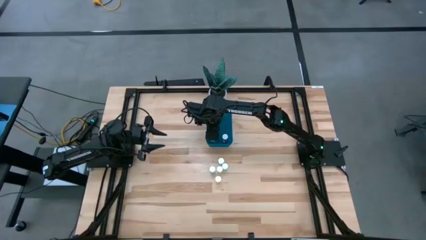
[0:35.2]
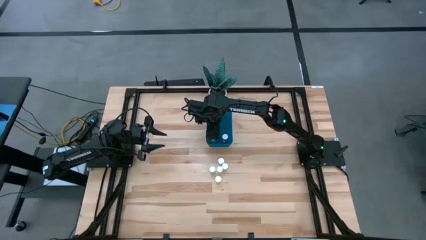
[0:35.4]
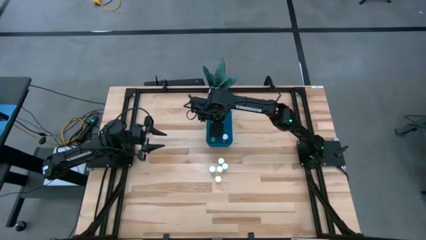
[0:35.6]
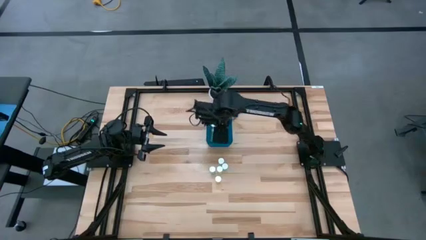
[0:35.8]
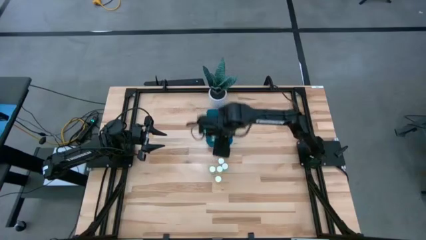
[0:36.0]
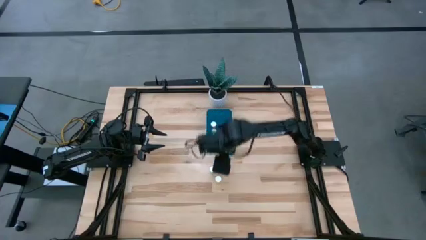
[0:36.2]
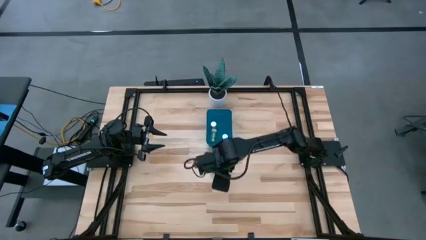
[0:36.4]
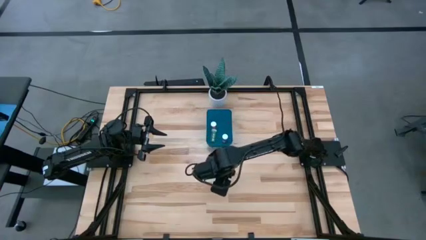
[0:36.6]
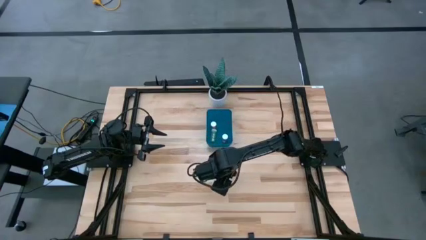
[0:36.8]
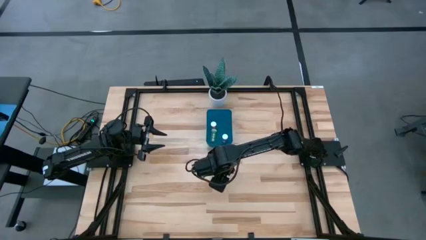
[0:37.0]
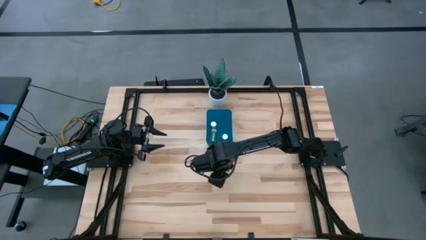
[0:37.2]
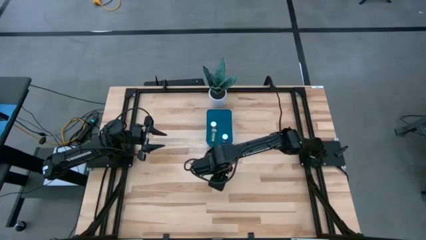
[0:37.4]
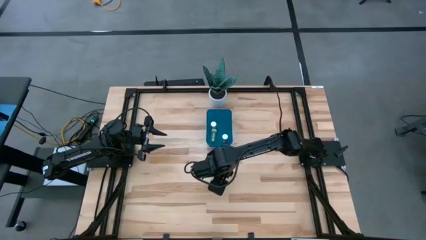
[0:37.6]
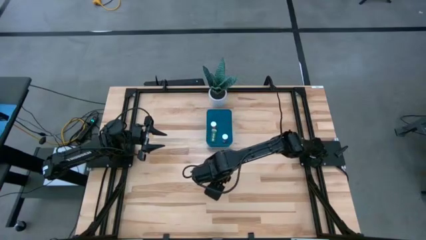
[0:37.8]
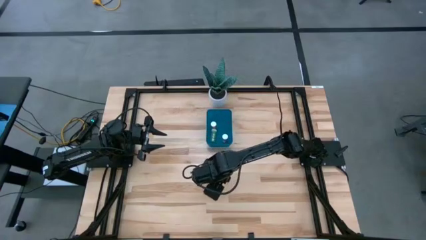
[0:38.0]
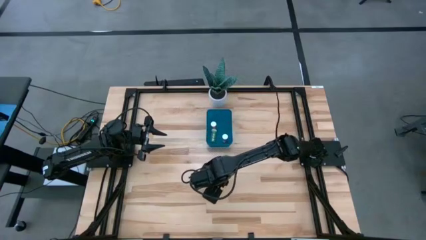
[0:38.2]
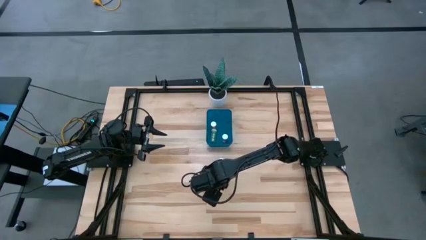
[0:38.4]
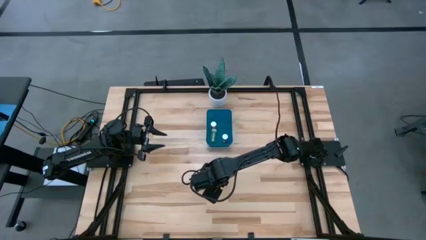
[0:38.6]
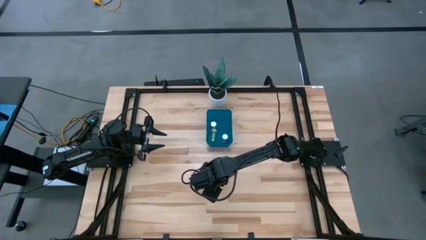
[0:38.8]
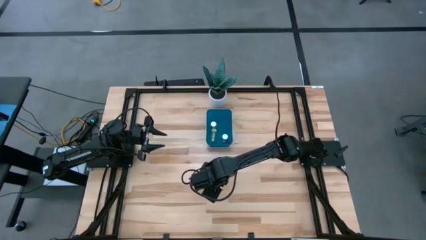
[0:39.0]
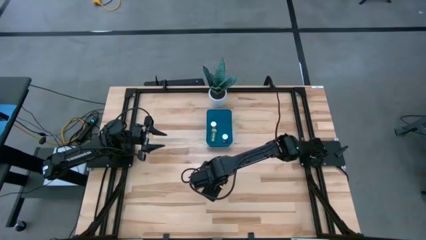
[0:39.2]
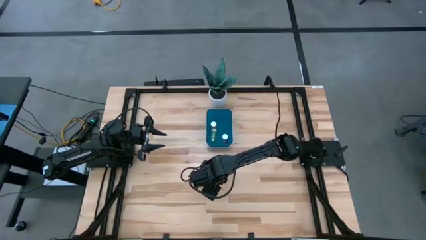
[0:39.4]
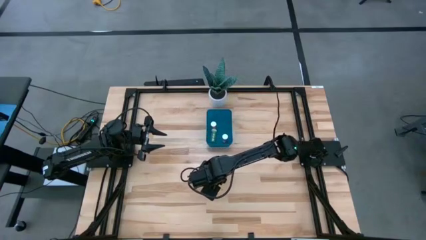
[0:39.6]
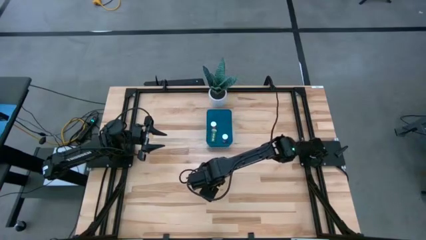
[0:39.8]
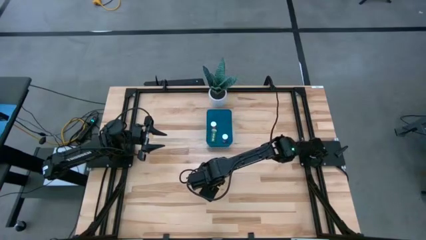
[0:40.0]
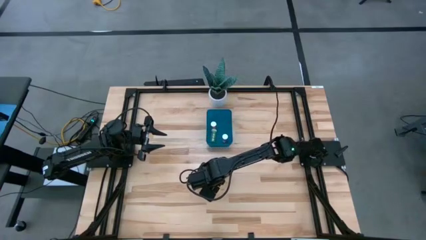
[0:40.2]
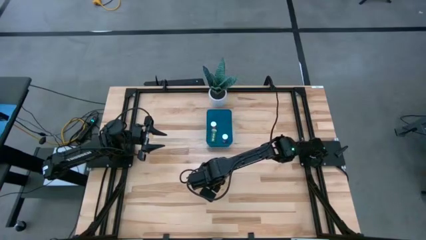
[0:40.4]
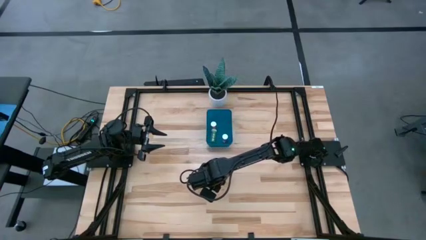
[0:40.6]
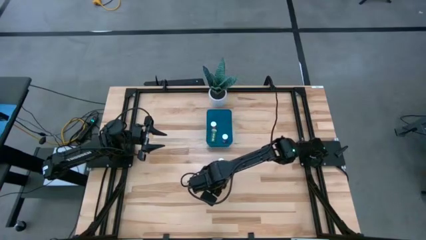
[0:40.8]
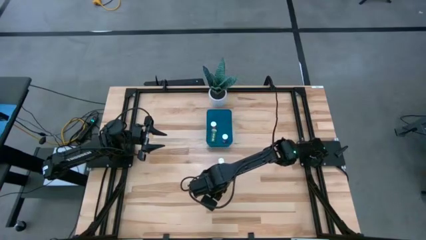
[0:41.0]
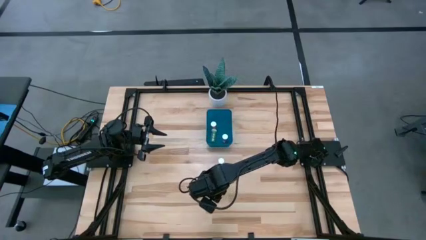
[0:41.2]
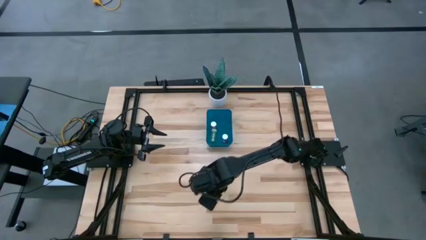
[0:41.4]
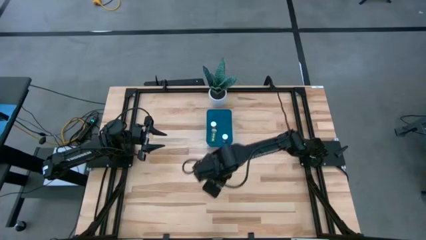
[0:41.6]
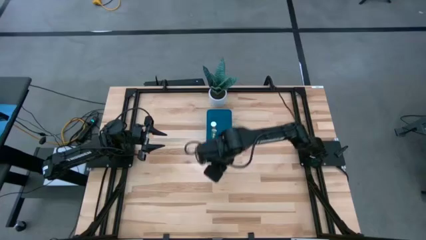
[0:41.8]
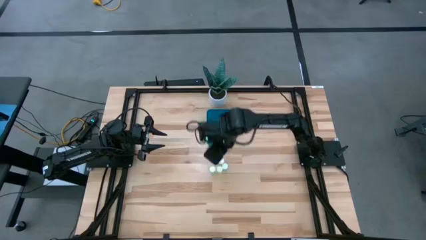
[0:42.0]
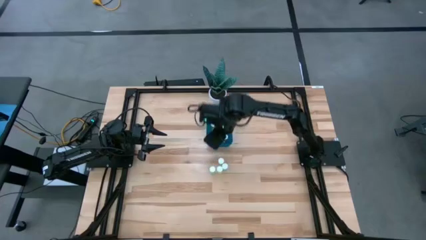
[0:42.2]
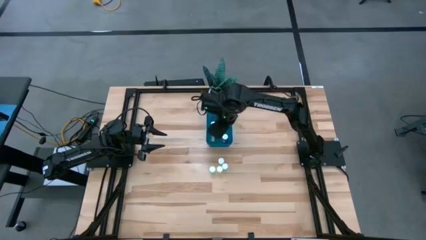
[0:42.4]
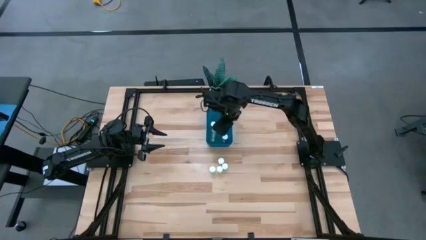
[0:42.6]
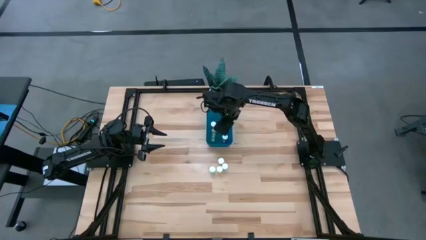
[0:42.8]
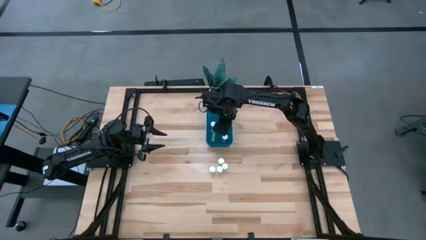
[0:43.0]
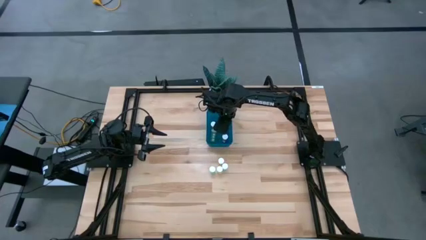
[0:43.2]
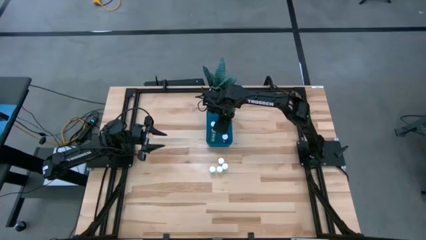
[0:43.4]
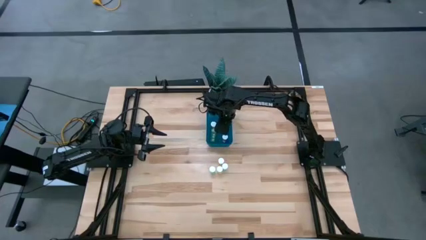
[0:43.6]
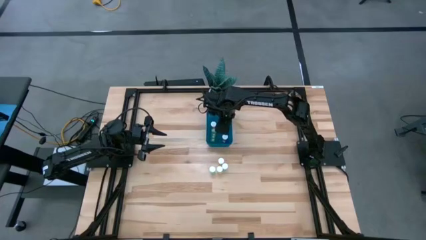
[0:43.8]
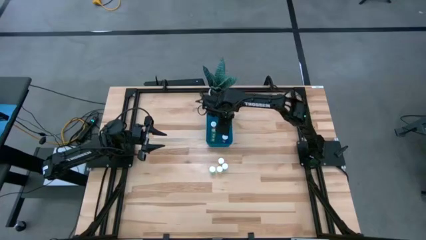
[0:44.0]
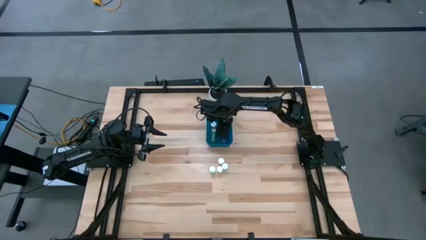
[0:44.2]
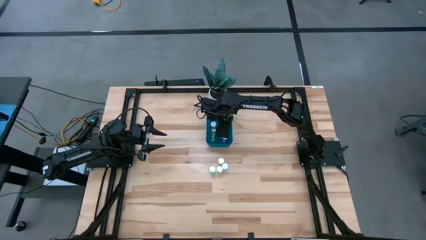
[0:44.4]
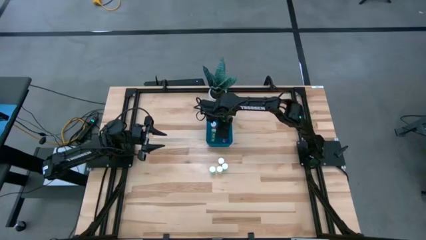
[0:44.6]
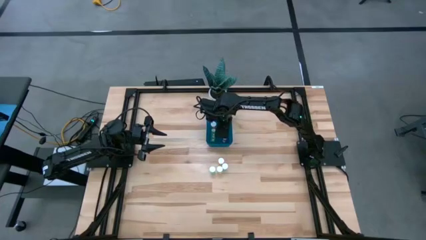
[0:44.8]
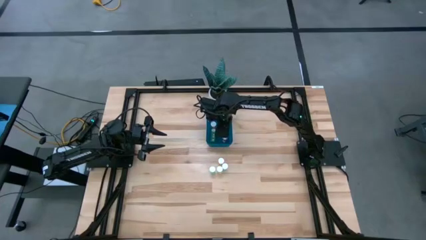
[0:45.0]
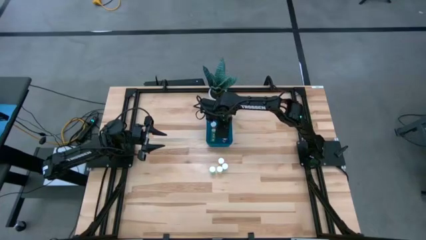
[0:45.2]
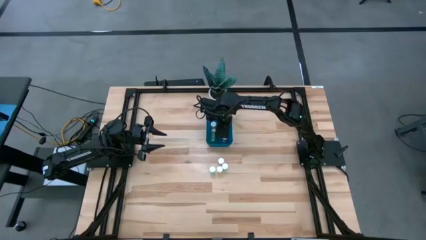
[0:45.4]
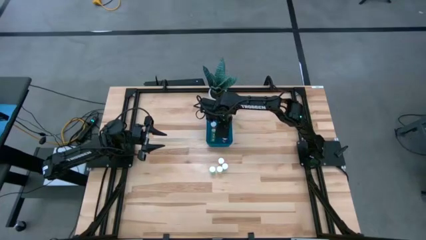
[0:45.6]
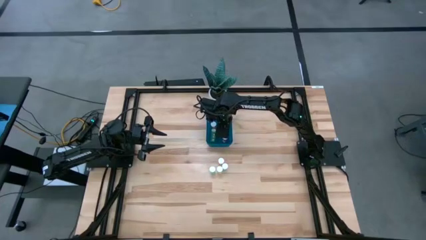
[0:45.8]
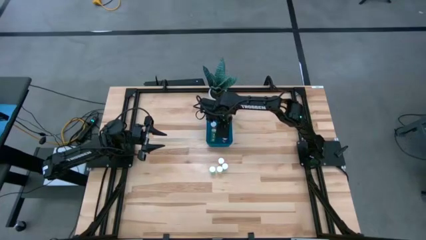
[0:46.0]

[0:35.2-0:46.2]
Task: Pick and place pill bottles into a basket
Put the bottom yellow pill bottle into the bin
